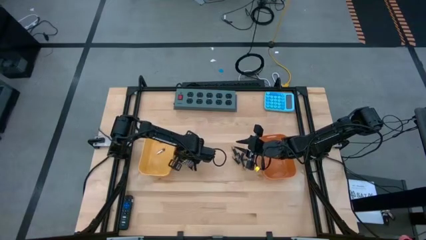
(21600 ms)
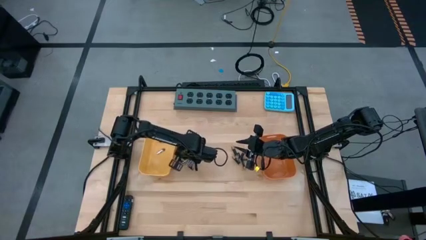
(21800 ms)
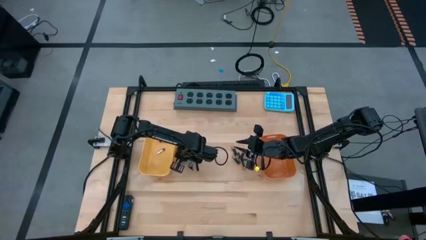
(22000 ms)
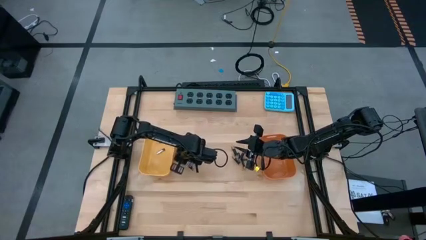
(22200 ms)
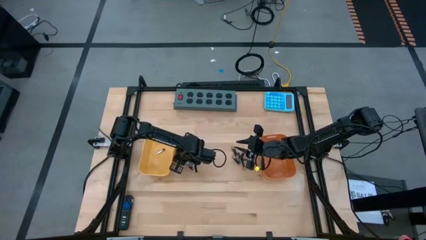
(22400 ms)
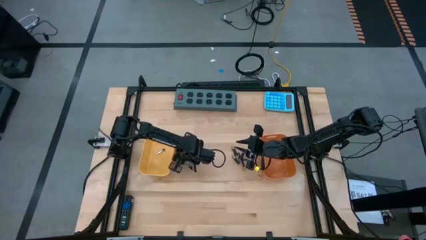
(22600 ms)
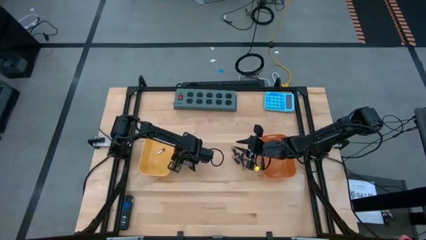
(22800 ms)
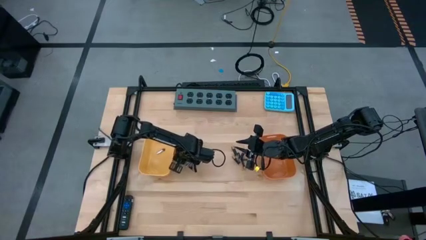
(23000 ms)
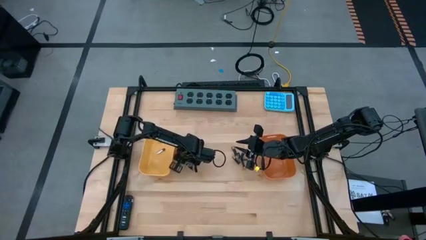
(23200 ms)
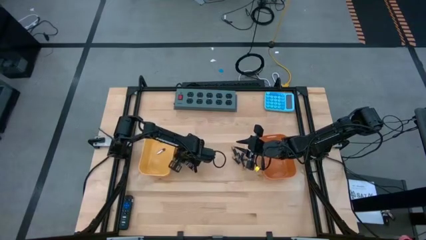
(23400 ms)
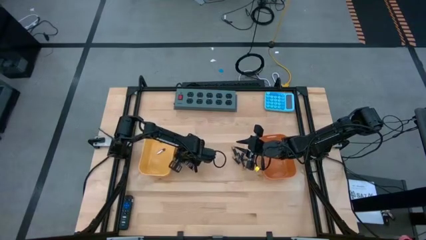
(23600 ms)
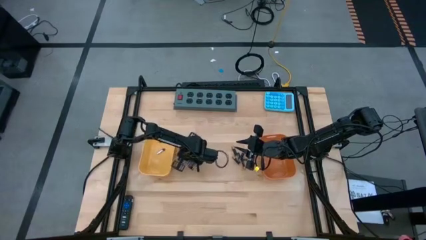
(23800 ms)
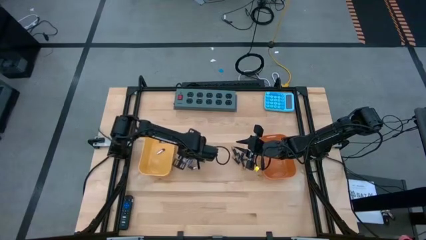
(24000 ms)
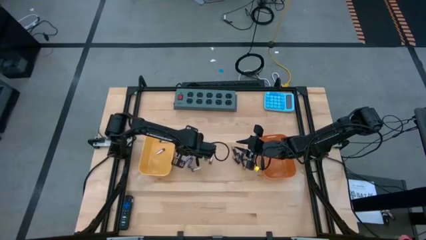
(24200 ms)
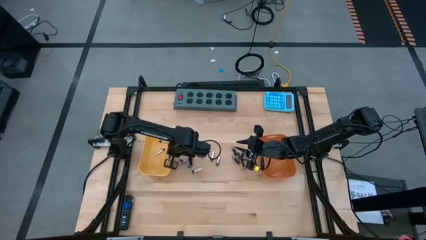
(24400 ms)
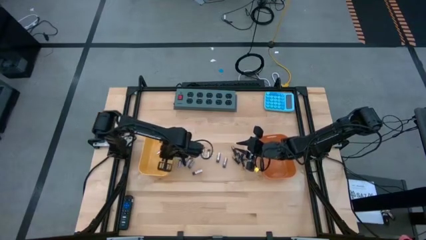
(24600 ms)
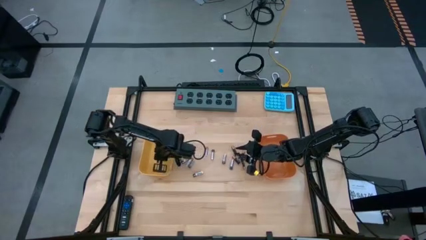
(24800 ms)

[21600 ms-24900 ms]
Task: Sort batteries
Put the silver battery into the yellow bin

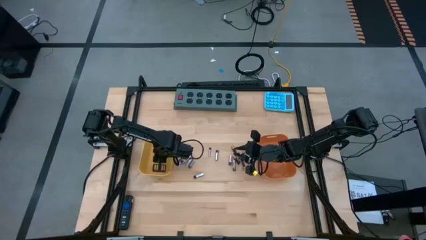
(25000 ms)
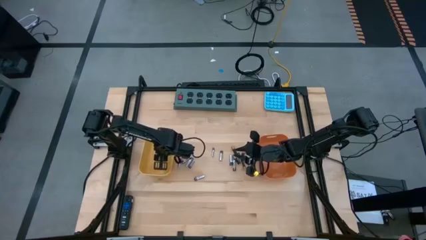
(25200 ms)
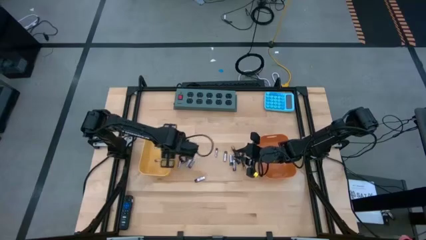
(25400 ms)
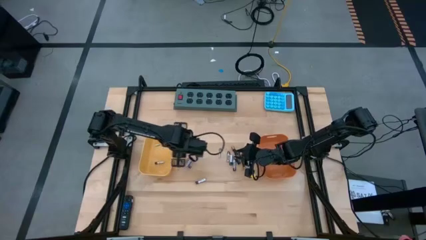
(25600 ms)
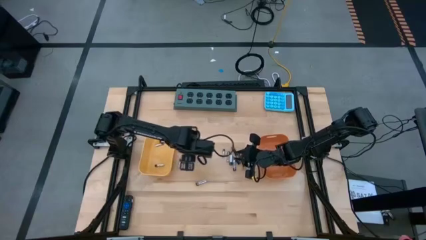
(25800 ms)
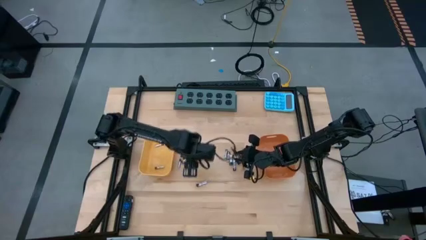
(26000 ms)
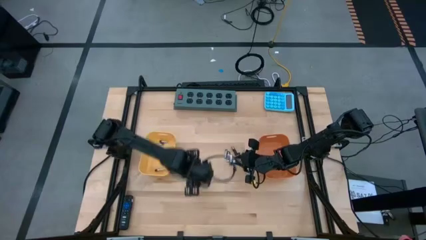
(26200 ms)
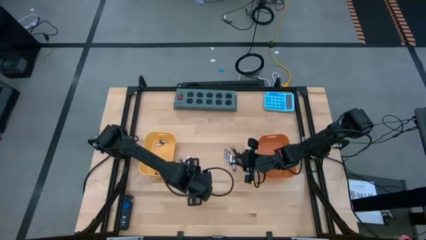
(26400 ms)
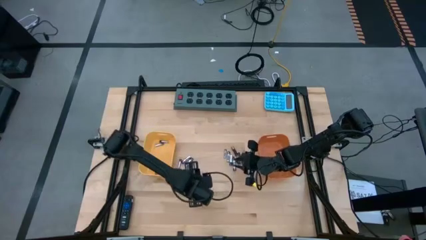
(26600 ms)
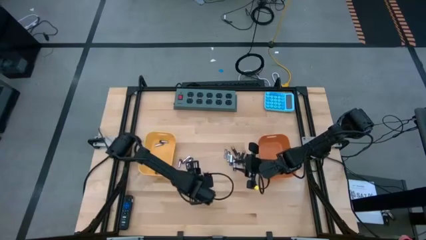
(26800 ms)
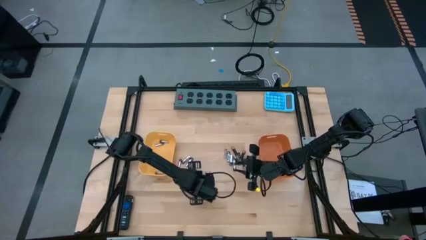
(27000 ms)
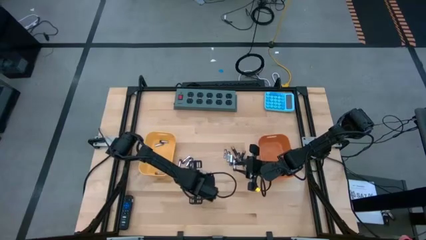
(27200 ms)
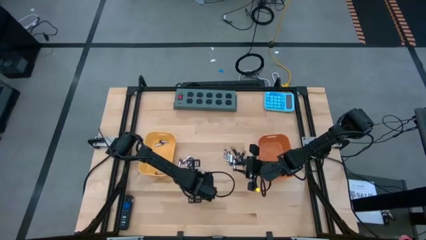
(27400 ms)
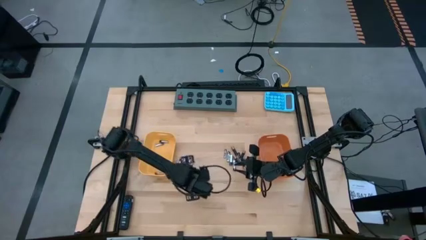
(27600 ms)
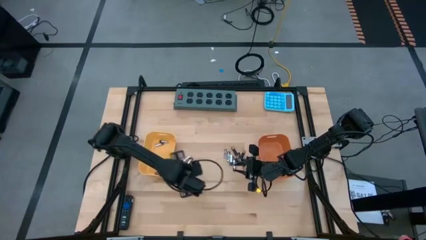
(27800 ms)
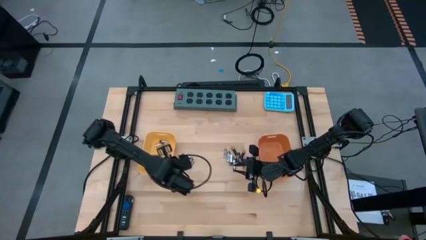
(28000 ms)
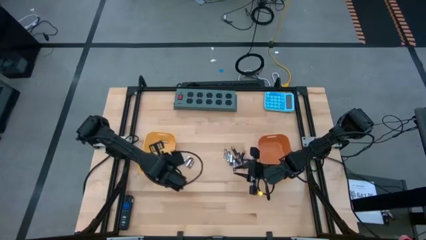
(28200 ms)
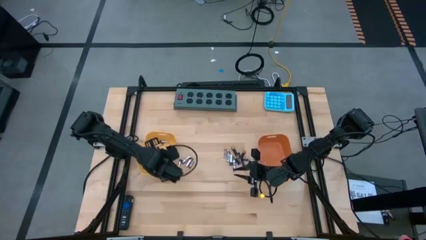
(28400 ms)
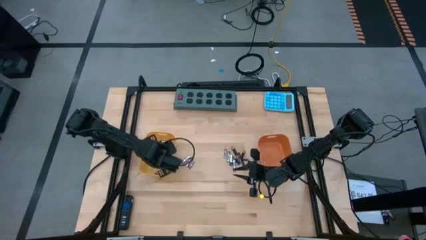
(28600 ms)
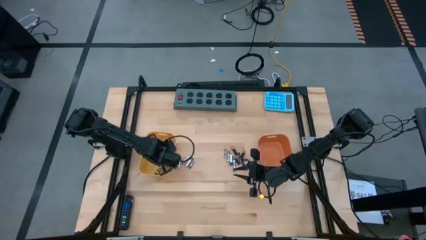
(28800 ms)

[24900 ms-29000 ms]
Put the silver battery into the yellow bin

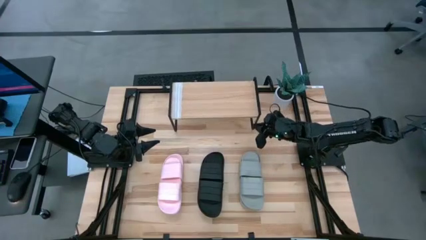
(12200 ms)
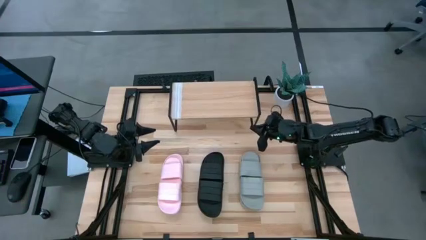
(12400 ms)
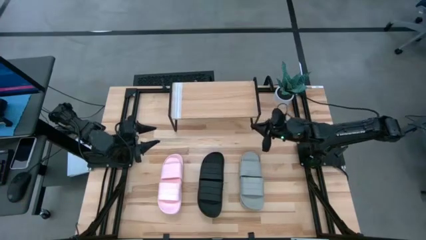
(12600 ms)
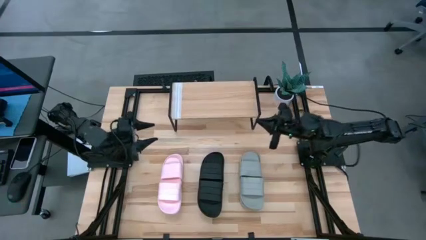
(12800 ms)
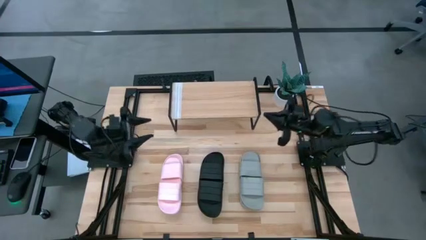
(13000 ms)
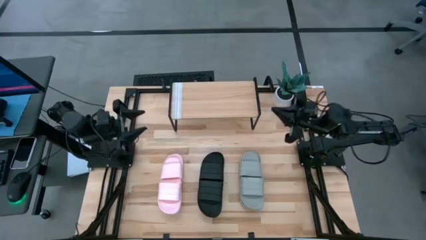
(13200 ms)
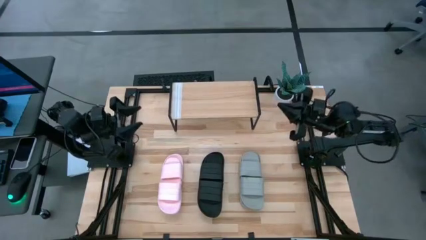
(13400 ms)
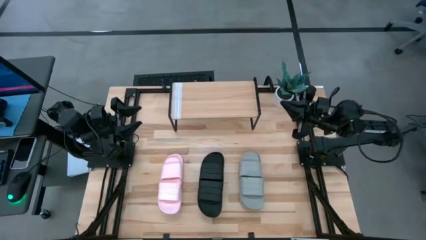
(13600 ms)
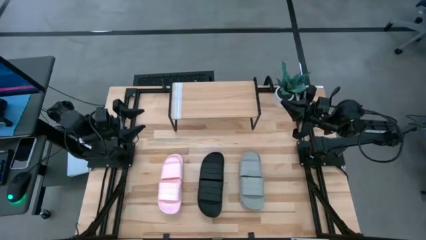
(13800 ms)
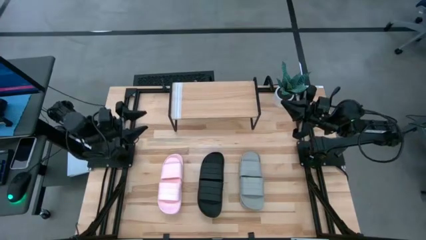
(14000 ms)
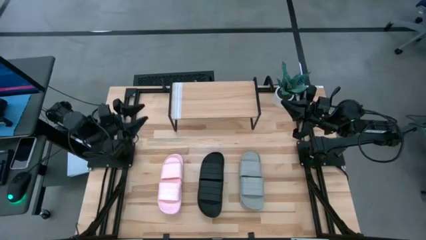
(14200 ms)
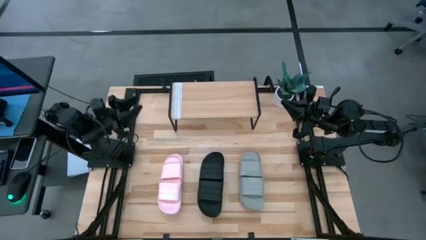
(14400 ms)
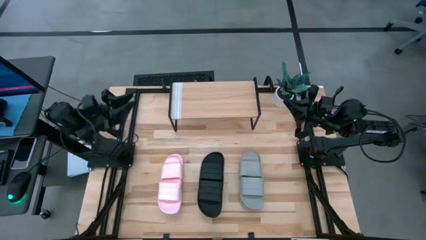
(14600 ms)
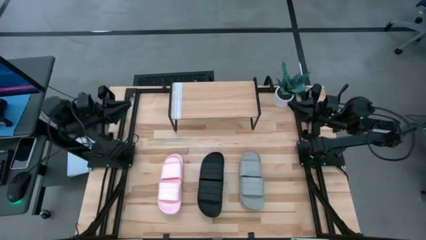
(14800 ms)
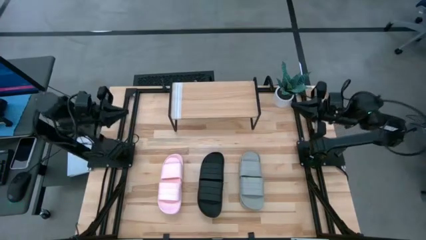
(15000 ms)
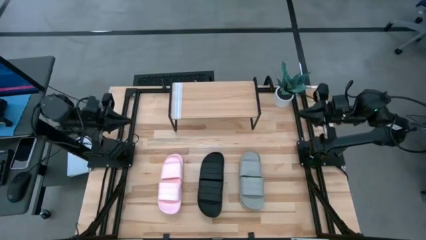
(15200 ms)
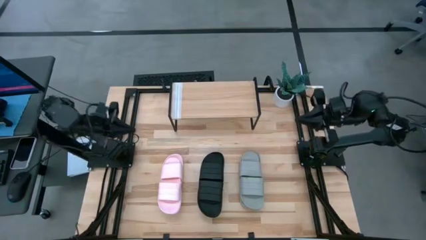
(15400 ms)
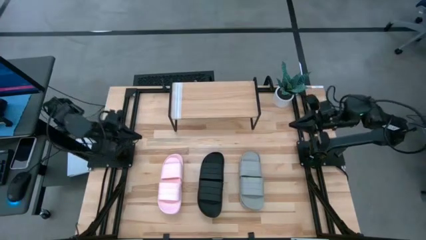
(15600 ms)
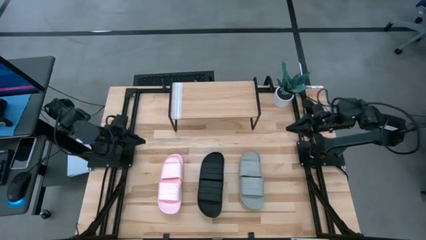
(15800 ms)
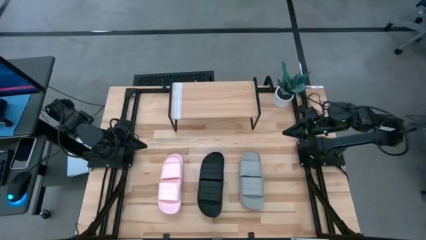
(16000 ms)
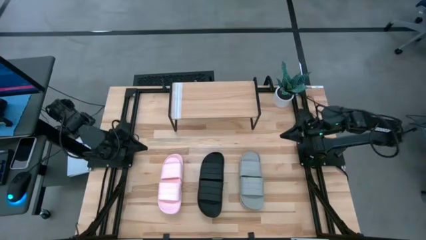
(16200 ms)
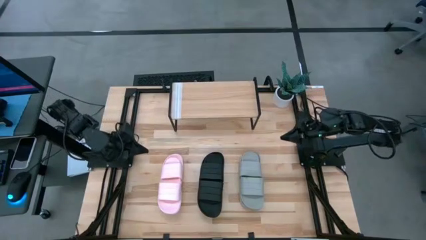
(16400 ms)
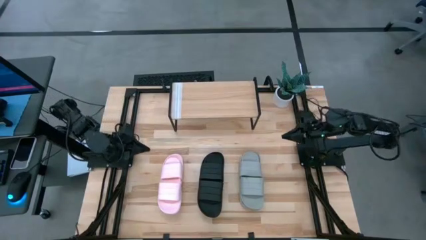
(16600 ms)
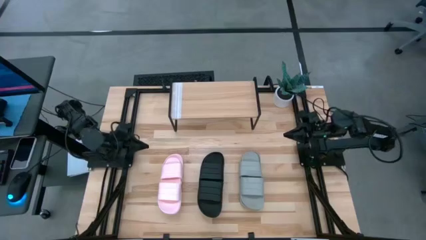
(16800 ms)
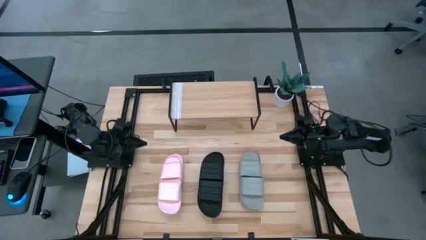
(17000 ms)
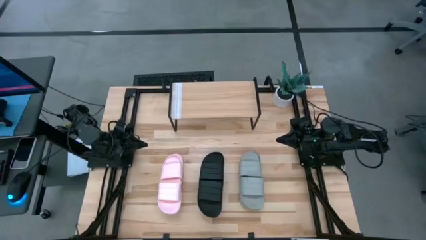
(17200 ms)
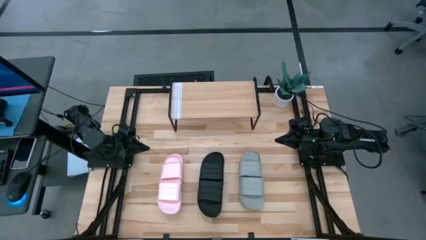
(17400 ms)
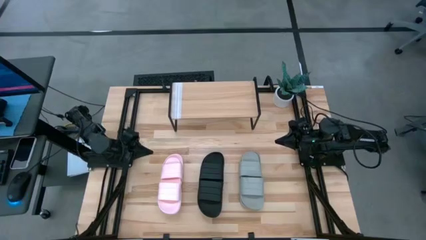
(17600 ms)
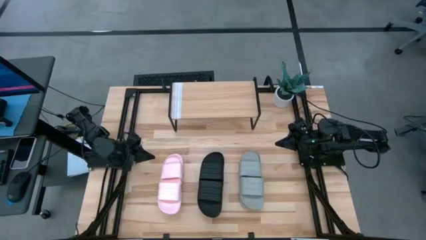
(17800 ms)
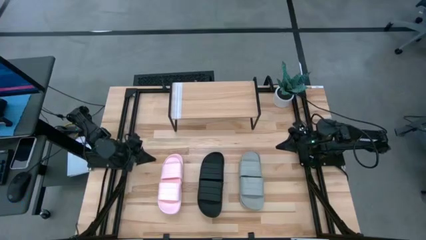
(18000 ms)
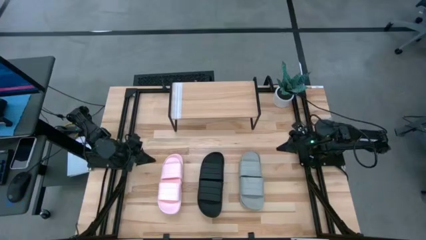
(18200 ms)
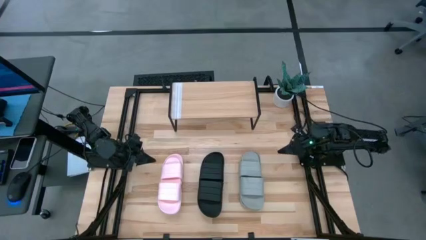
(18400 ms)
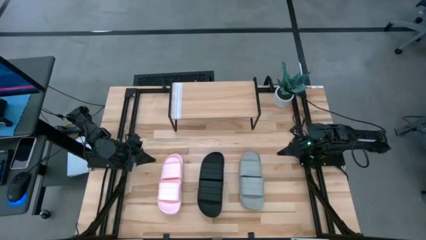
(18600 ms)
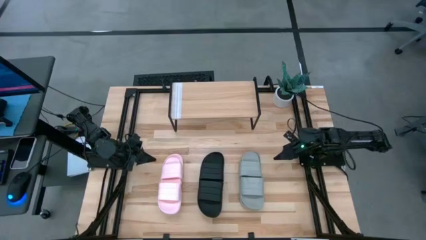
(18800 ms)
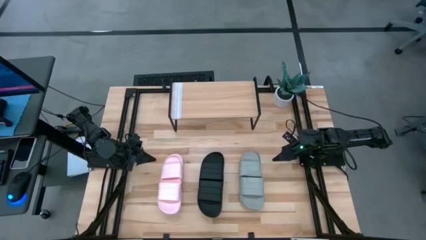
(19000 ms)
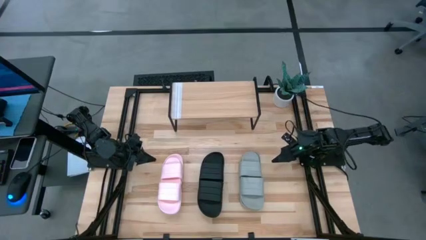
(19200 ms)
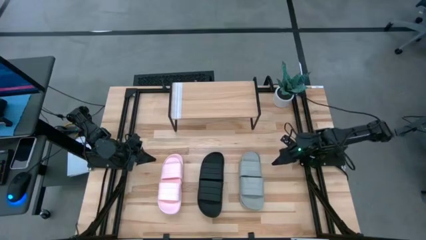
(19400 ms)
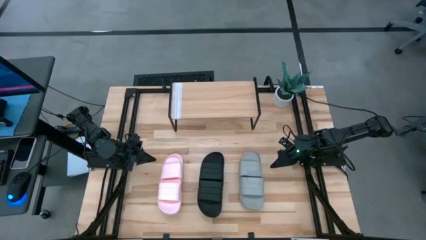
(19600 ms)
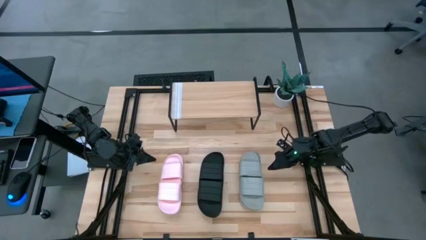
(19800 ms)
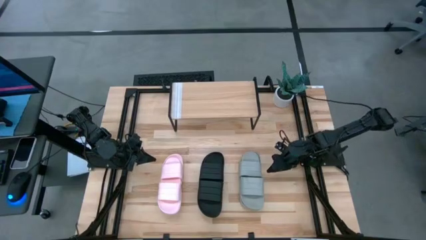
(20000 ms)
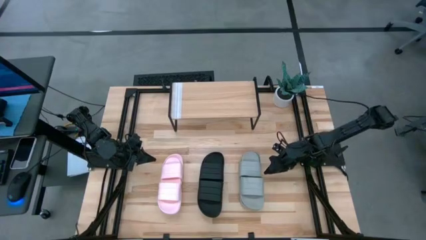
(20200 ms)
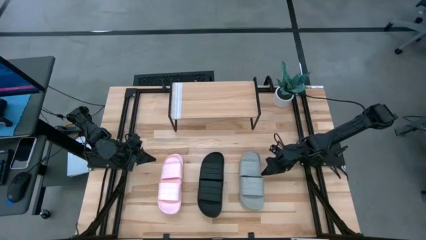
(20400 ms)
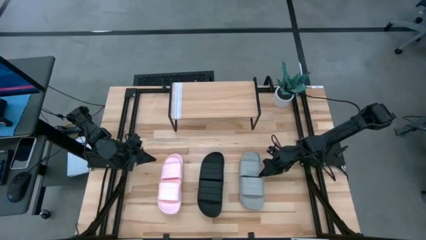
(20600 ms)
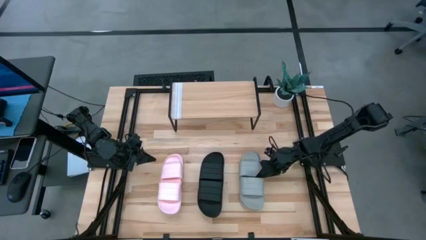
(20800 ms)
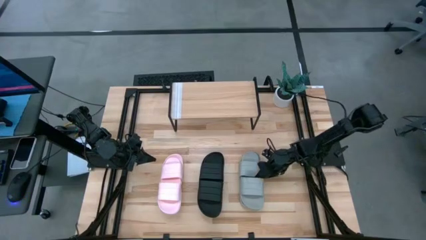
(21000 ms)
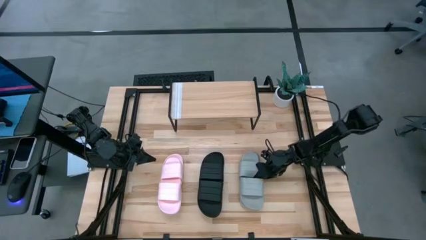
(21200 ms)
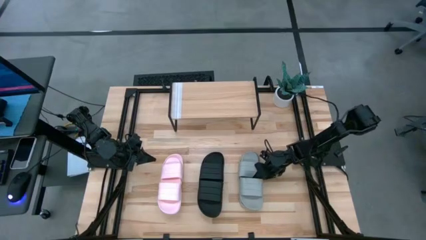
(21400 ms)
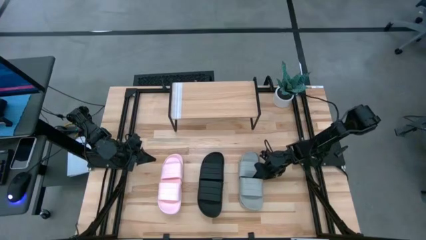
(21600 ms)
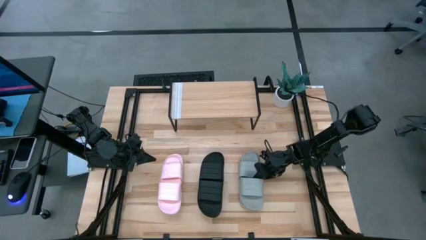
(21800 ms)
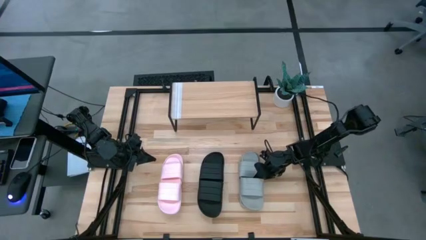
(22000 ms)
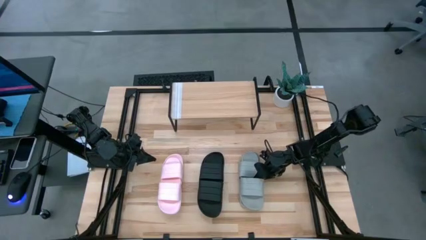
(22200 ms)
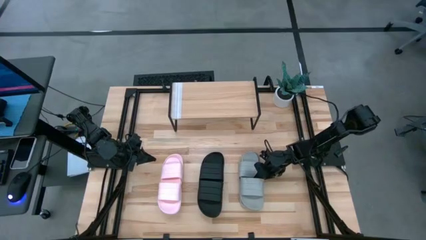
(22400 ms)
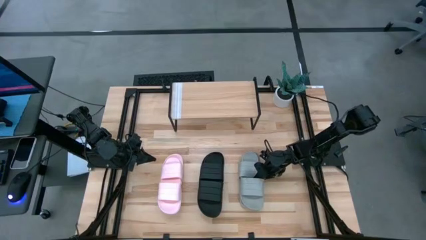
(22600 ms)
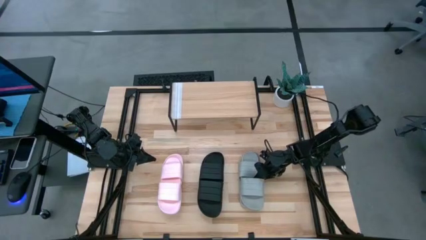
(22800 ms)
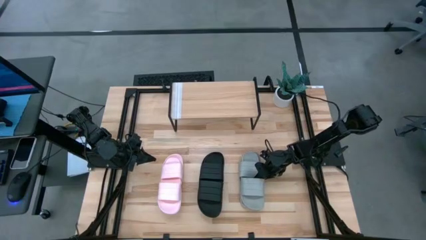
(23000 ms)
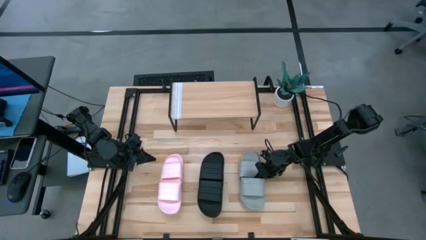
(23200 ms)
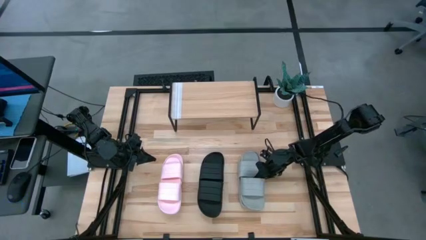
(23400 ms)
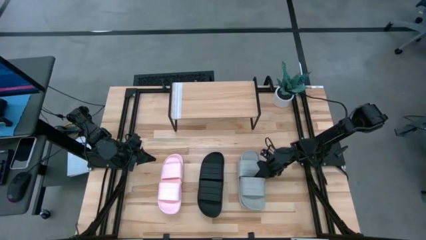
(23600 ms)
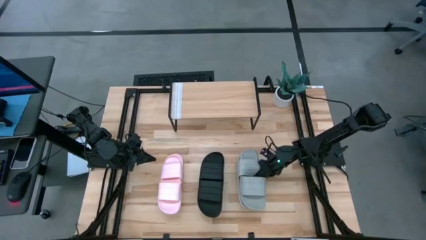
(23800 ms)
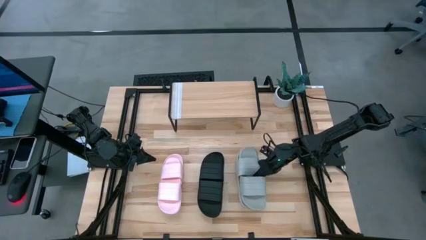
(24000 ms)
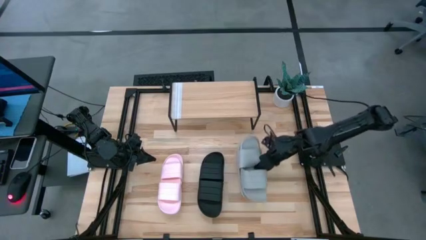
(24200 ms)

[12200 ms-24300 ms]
Task: Pick and place slides into the shelf
Put the gray pair of slides on the shelf
